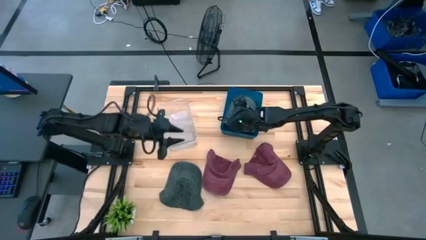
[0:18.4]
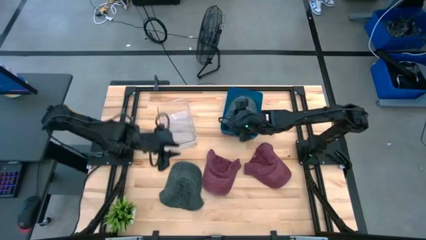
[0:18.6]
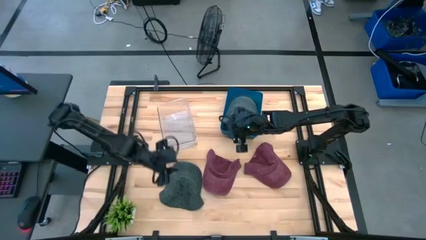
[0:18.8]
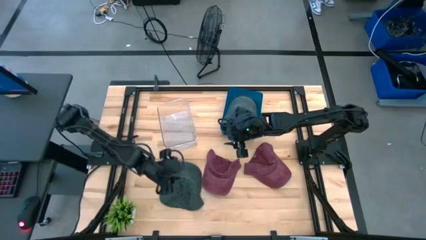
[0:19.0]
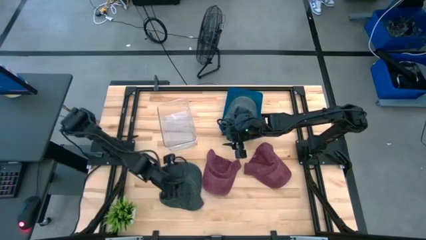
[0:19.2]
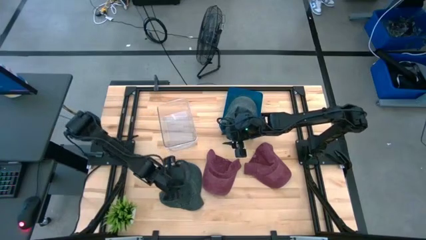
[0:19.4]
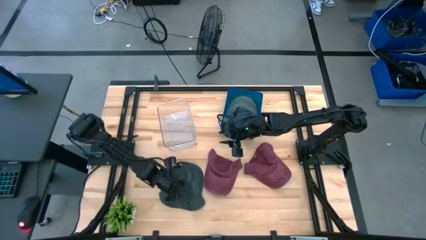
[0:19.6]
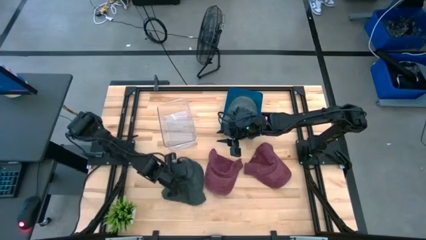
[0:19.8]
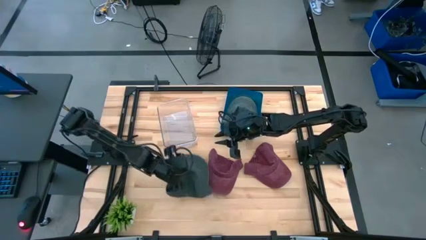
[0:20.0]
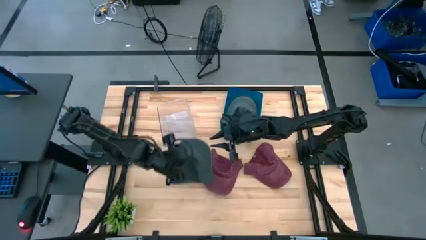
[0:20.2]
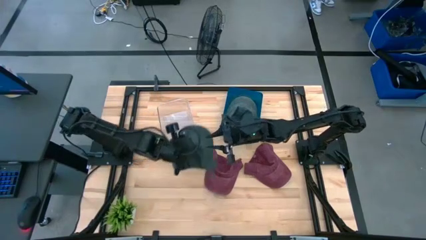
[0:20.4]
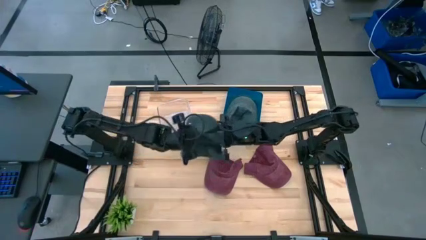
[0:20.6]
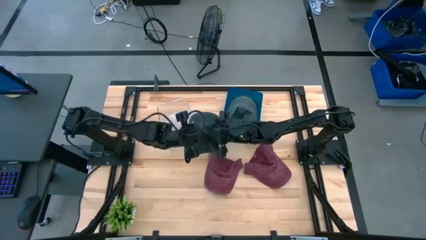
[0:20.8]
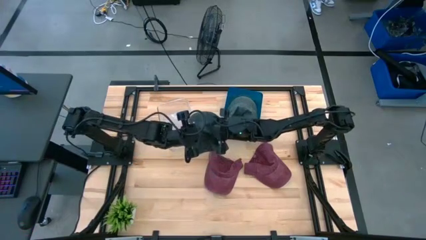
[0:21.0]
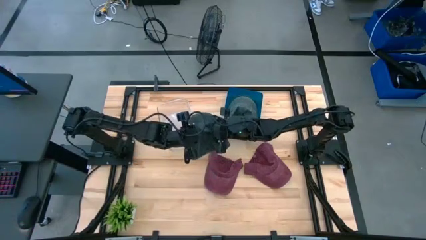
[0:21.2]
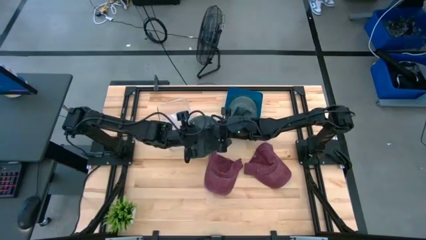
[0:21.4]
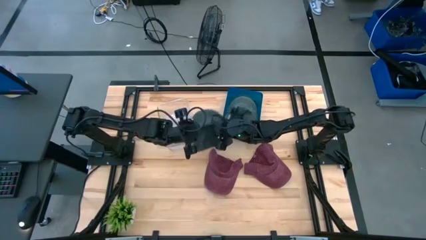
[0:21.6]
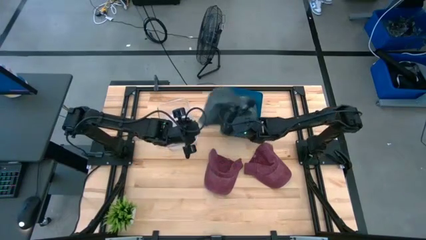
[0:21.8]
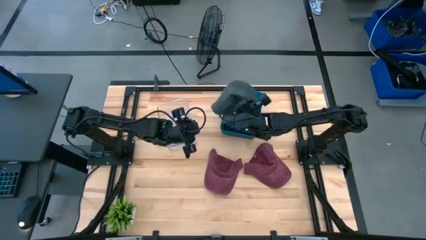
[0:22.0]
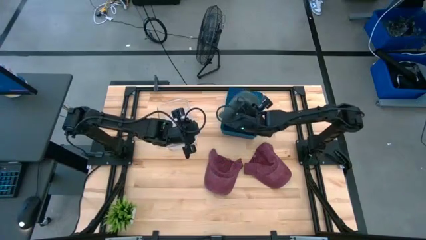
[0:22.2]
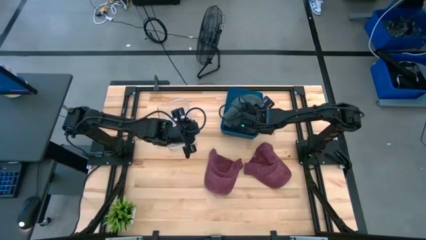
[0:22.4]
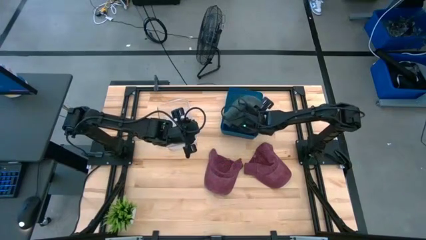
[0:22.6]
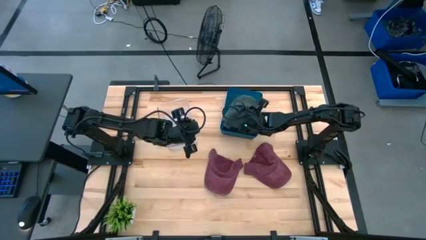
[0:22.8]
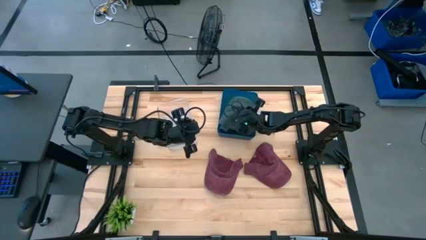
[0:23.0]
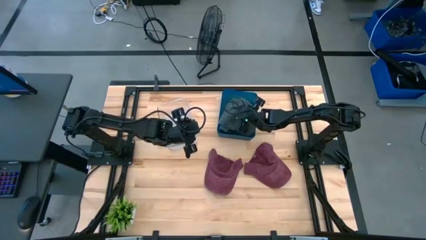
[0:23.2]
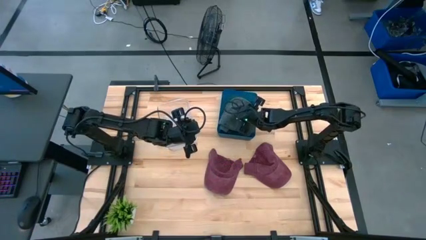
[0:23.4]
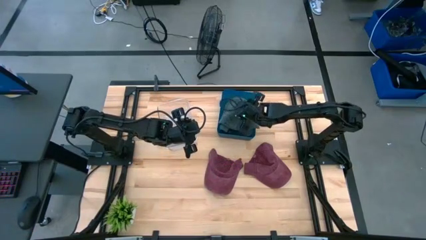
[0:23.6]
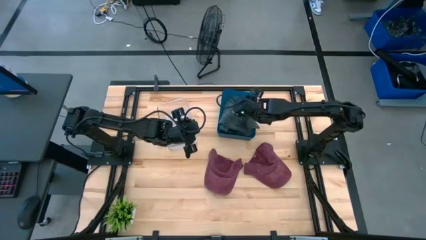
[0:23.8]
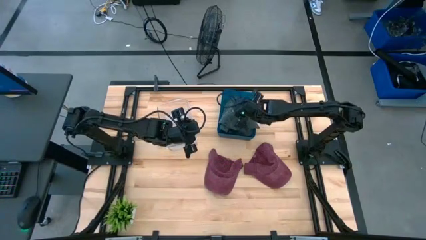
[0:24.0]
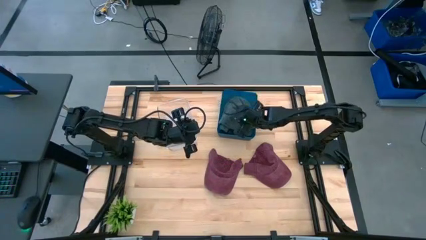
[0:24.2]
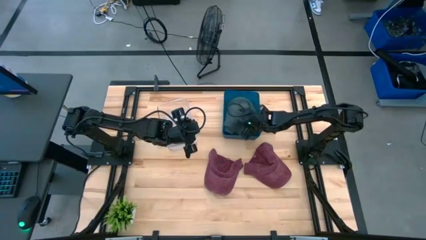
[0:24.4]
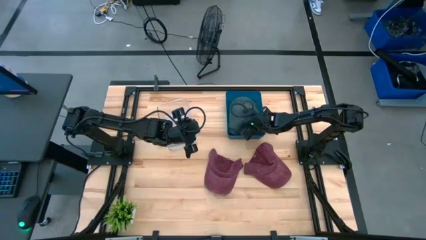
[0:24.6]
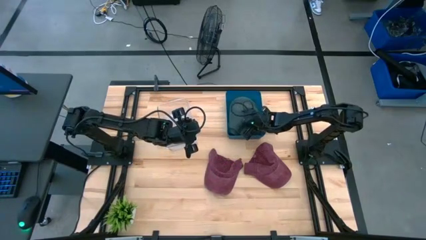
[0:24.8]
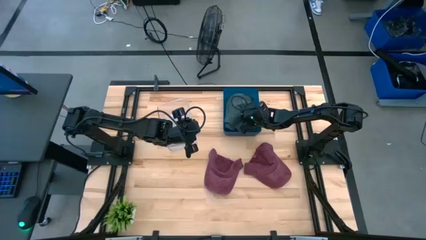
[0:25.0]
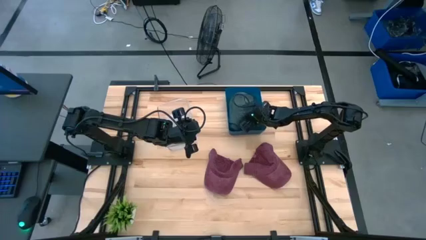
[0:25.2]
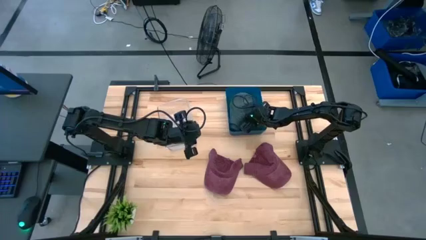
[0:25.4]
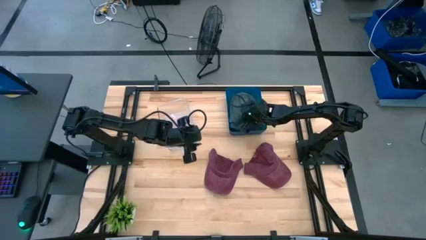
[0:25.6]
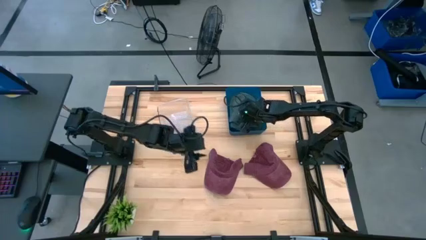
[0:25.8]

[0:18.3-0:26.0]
Task: Pick & Place hat
Put the gray cap into the blue bin

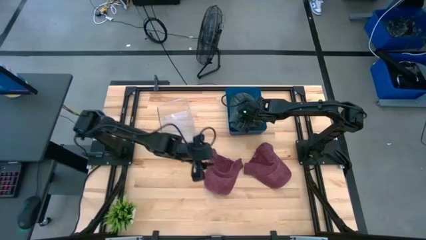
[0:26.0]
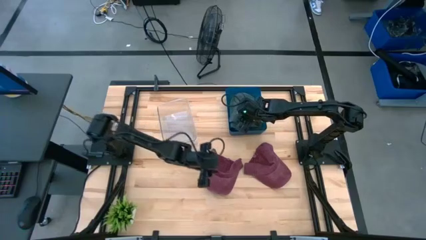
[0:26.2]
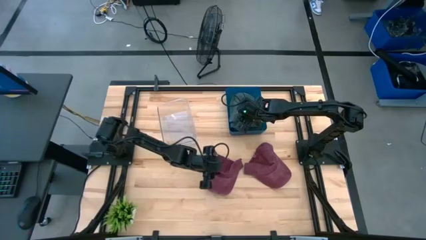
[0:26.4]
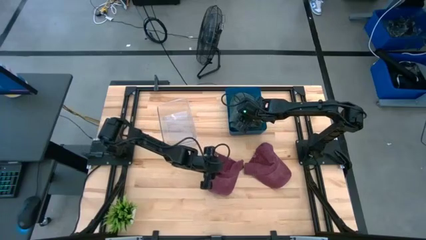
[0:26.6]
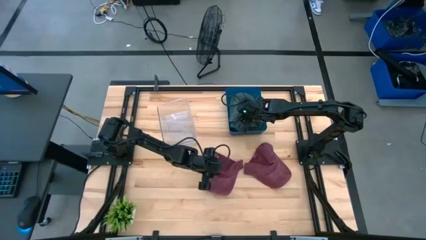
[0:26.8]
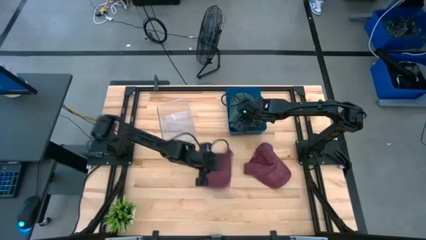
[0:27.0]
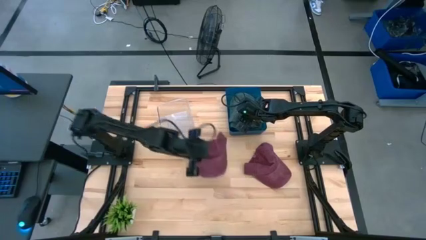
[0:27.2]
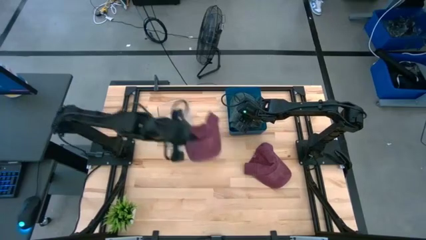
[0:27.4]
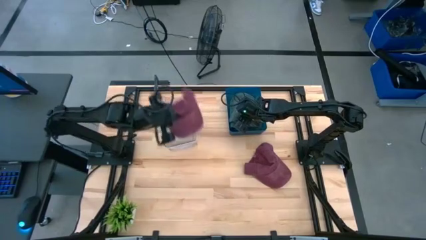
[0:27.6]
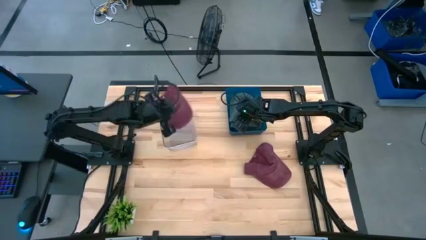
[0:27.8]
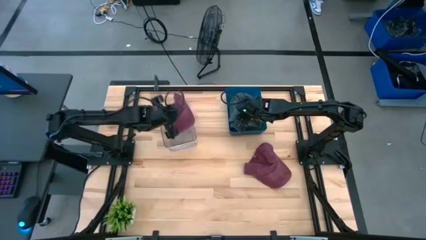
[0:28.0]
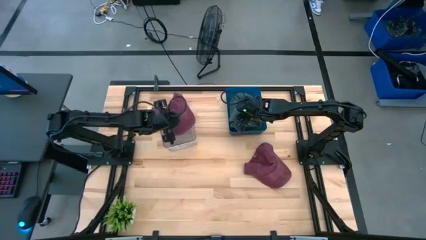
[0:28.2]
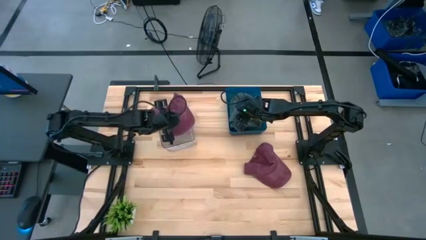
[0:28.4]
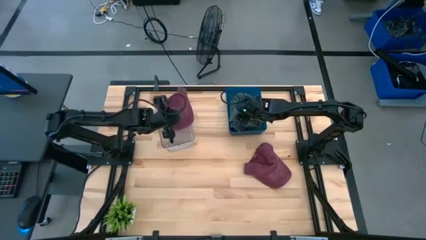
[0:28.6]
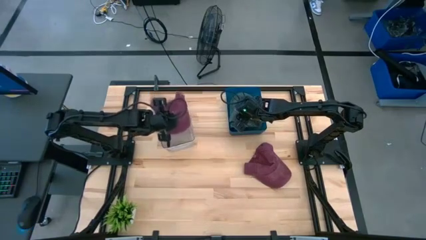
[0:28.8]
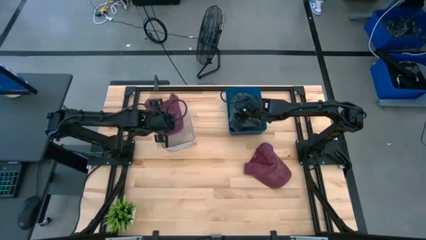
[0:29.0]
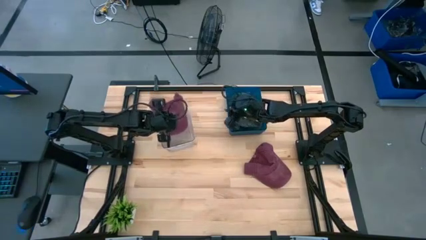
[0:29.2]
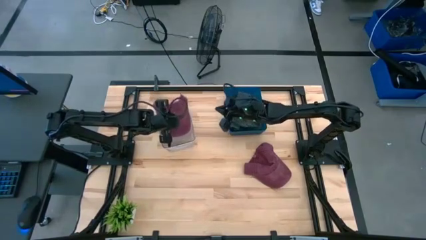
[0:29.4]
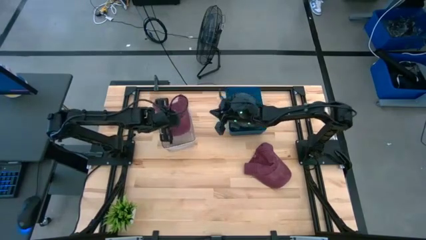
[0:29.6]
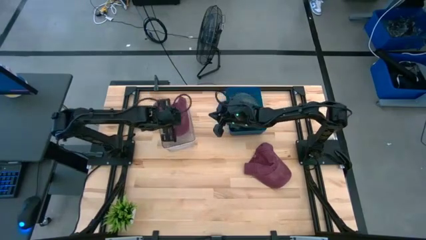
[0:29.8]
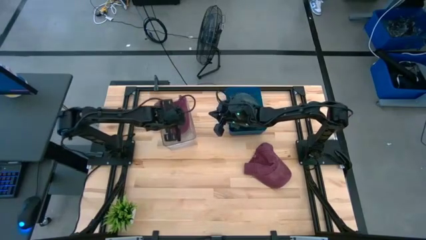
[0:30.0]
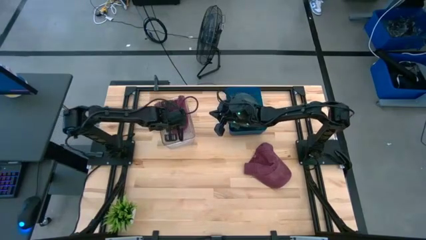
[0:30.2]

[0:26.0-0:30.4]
Put the left red cap into the transparent bin

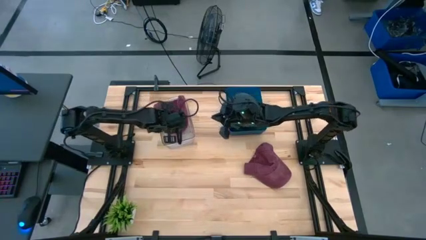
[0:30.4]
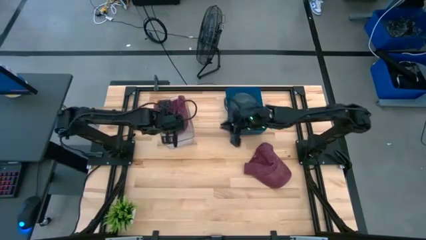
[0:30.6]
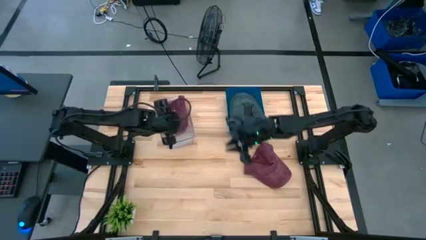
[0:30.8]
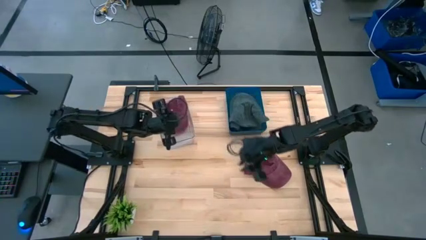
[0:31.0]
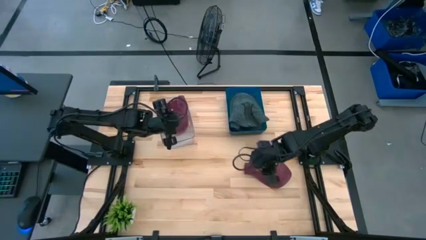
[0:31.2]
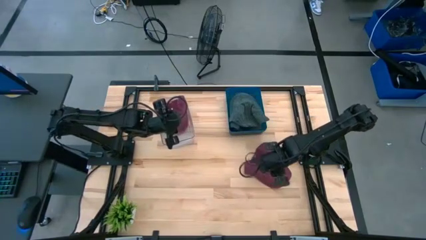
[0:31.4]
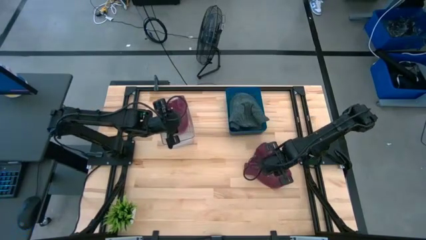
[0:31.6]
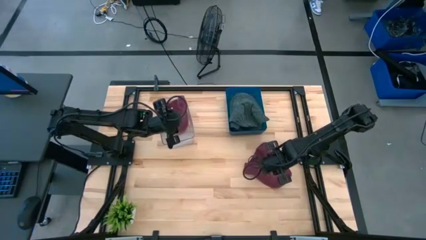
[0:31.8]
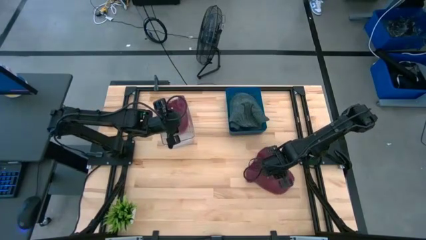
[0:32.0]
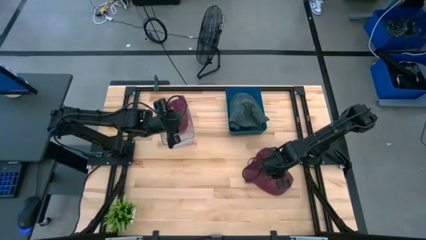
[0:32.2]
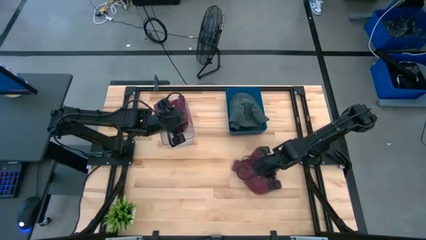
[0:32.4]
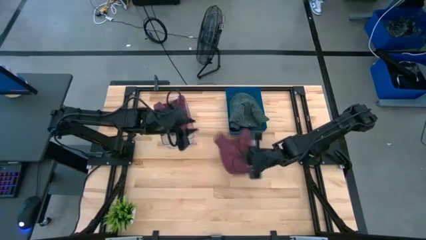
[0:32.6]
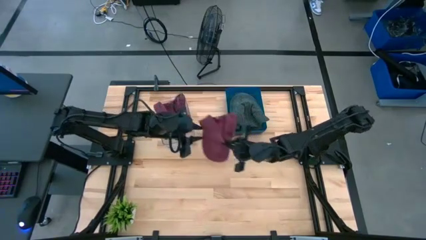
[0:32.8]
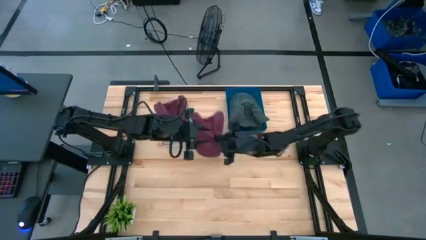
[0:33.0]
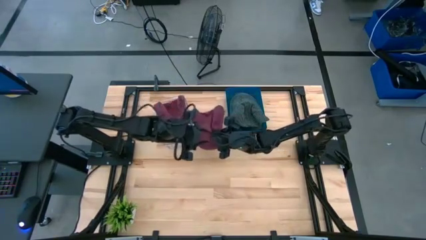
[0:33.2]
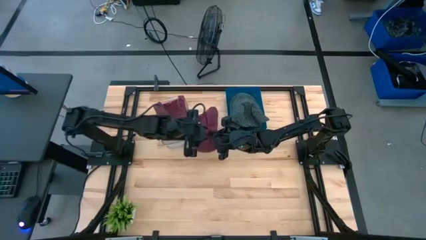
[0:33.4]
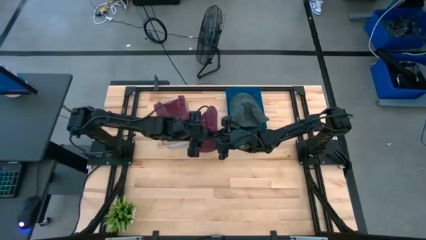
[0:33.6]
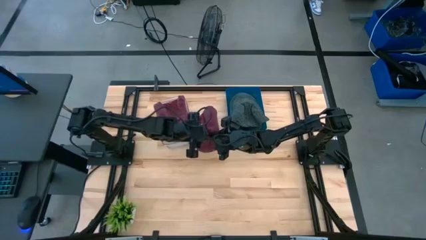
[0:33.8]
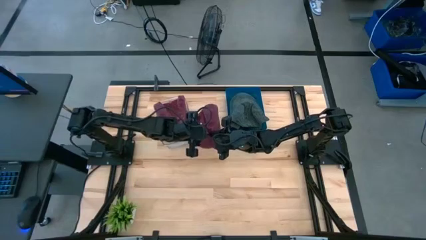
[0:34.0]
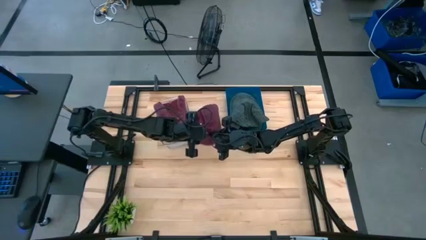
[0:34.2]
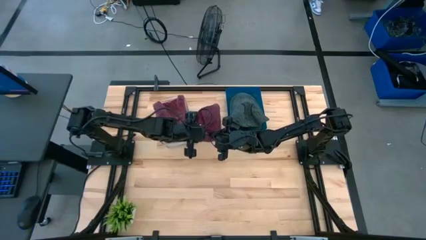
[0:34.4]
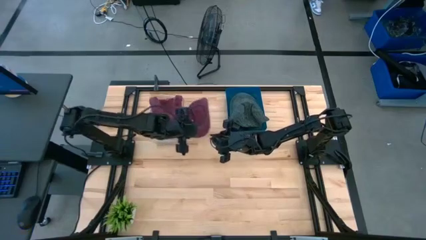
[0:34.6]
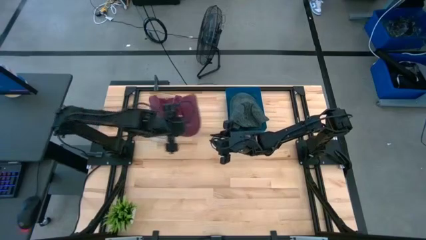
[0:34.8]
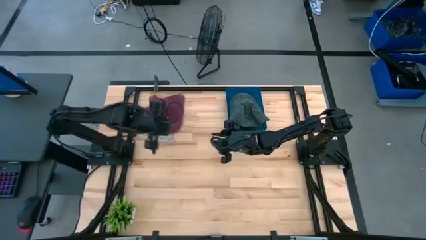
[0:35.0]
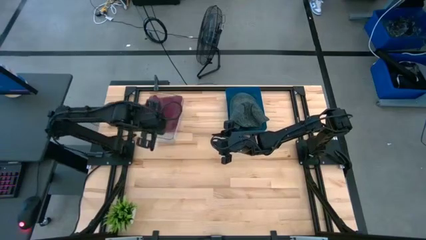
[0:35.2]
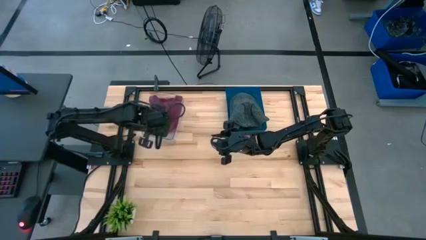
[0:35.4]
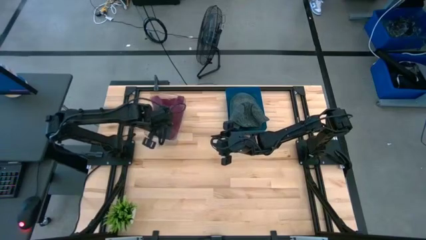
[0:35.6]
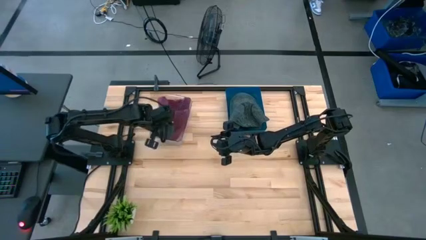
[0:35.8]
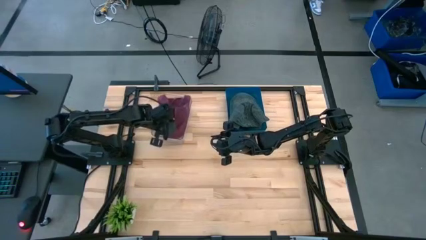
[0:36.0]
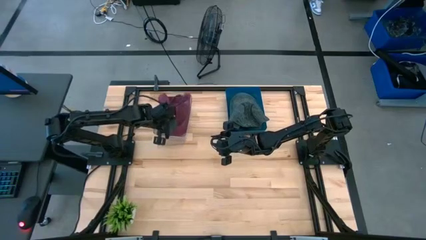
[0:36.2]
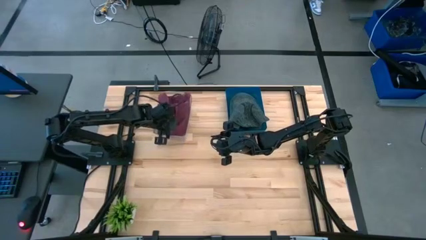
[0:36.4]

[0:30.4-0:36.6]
Put the red cap into the transparent bin
